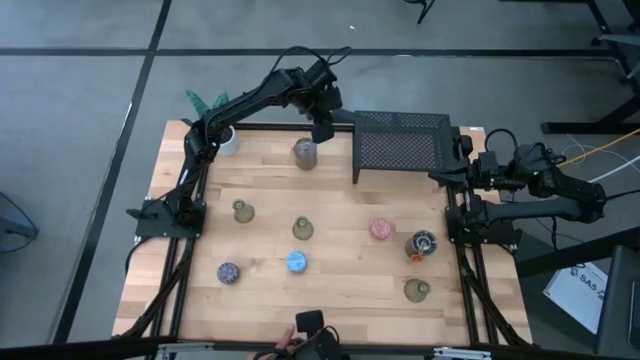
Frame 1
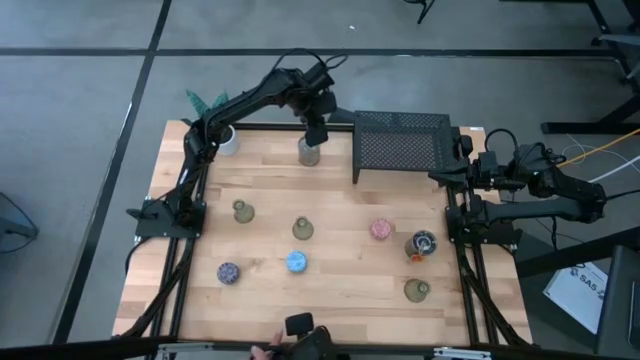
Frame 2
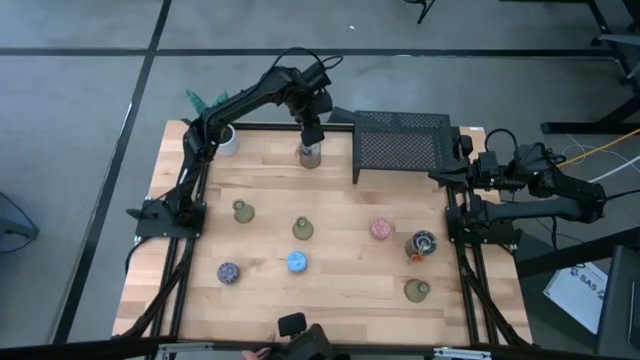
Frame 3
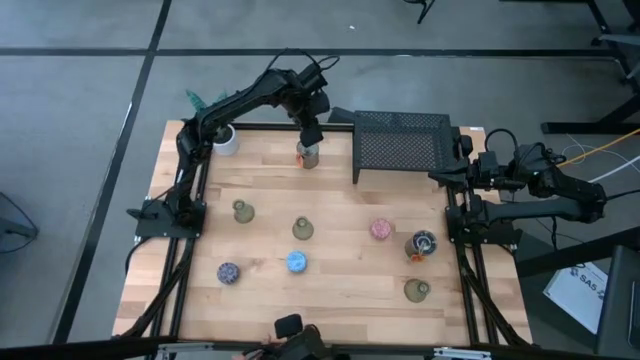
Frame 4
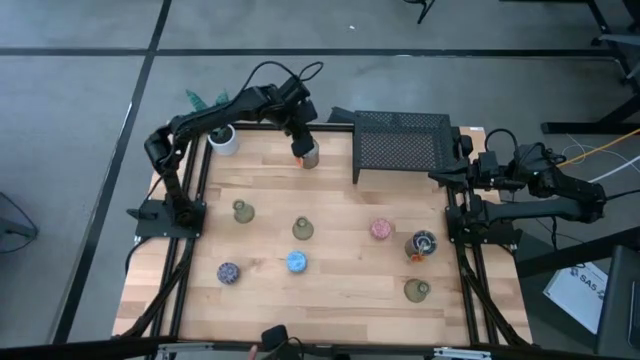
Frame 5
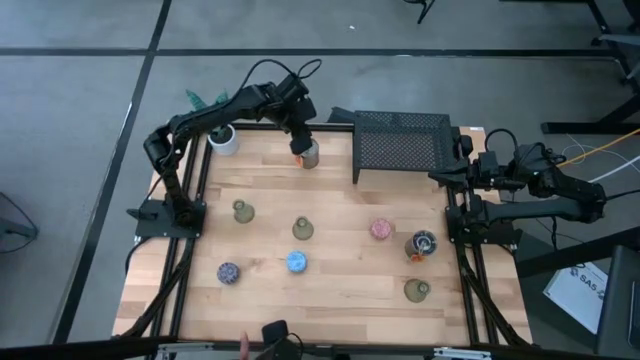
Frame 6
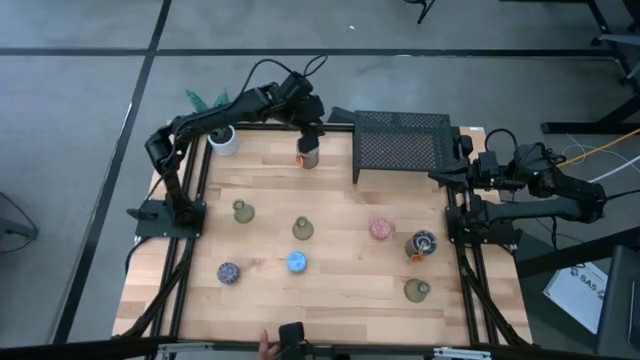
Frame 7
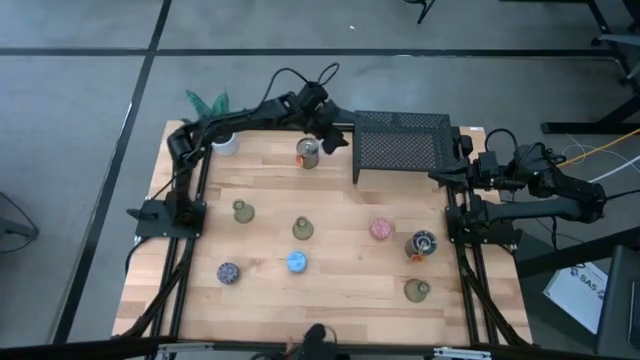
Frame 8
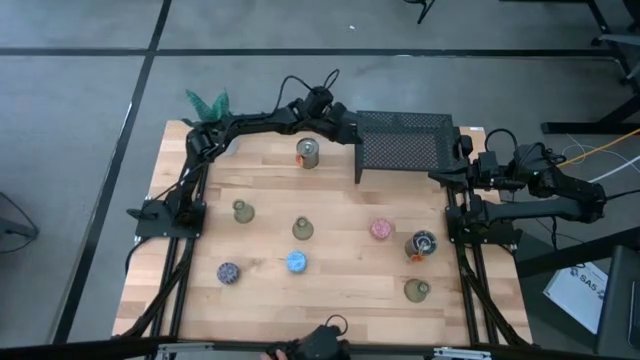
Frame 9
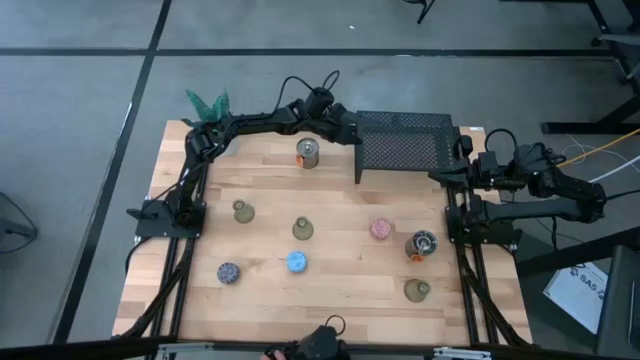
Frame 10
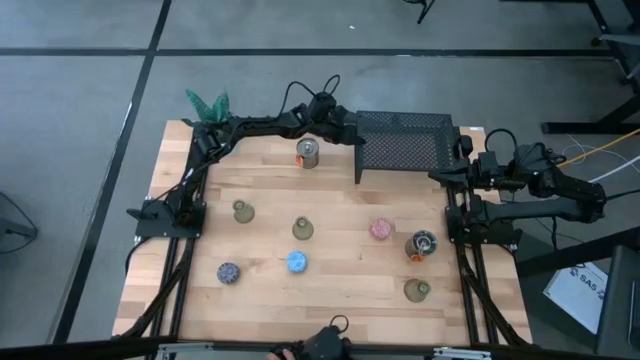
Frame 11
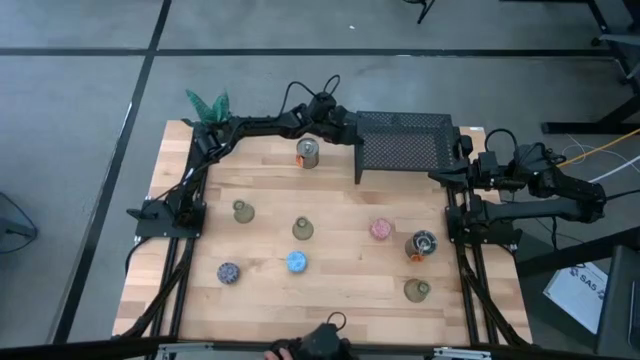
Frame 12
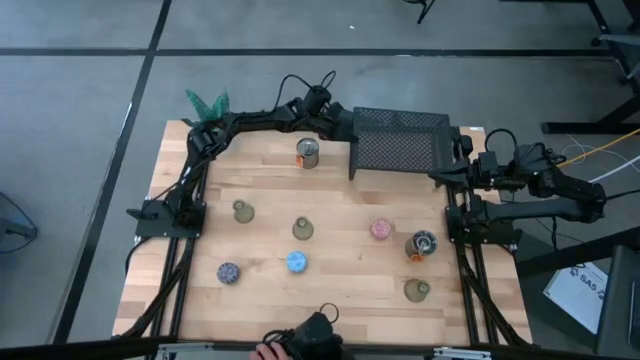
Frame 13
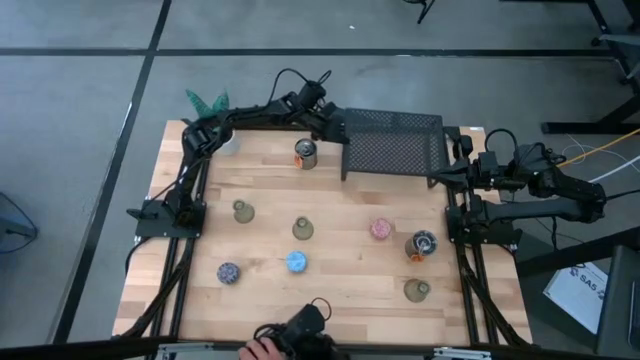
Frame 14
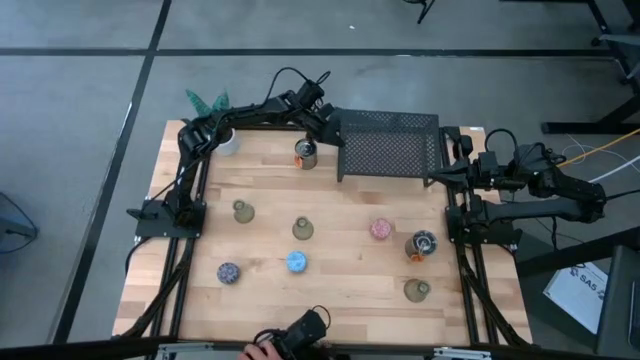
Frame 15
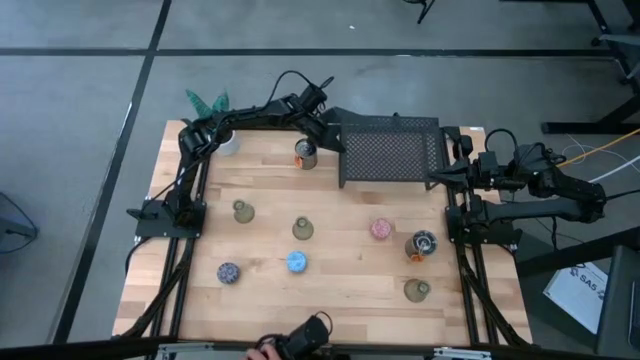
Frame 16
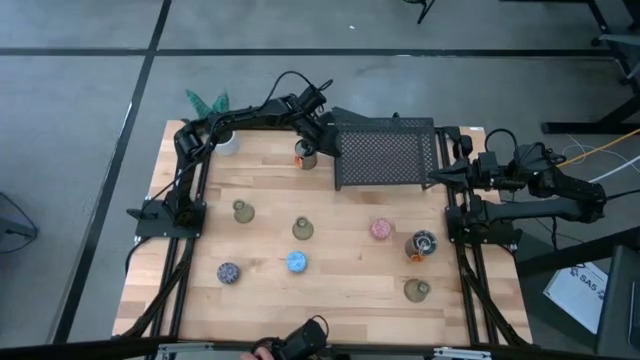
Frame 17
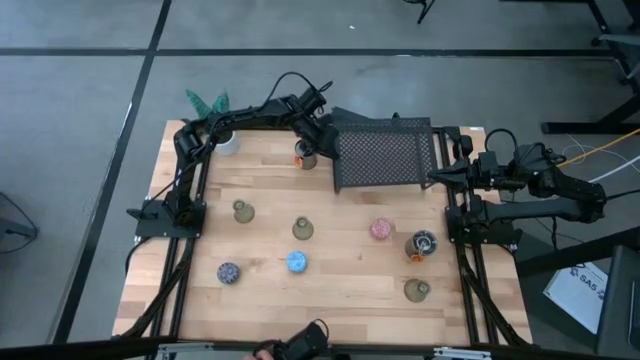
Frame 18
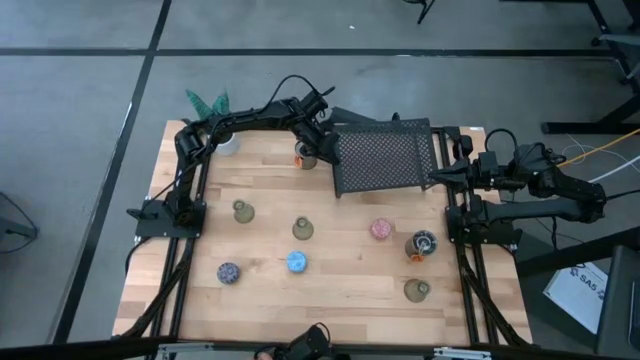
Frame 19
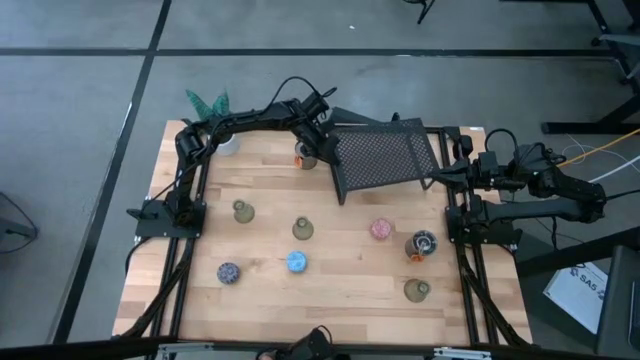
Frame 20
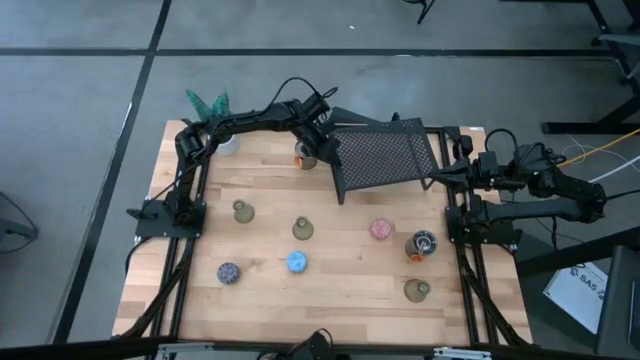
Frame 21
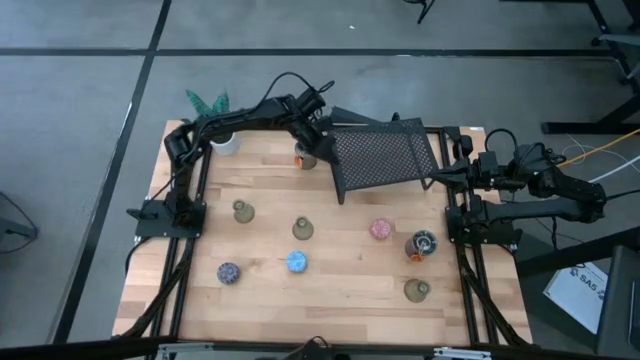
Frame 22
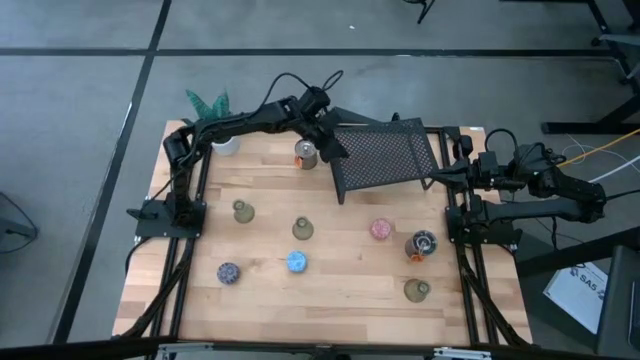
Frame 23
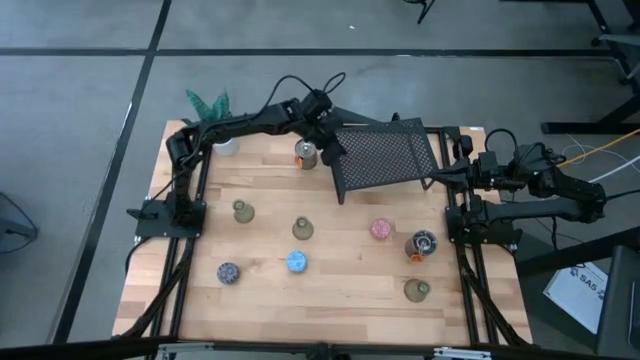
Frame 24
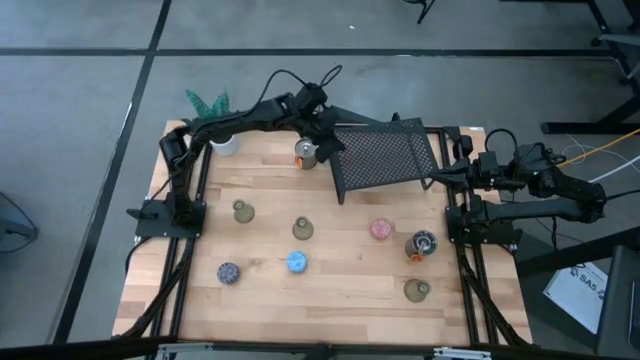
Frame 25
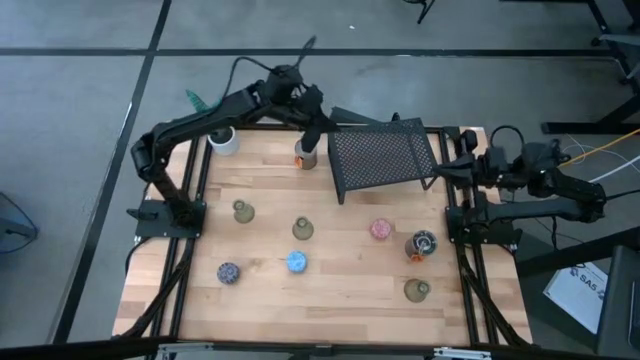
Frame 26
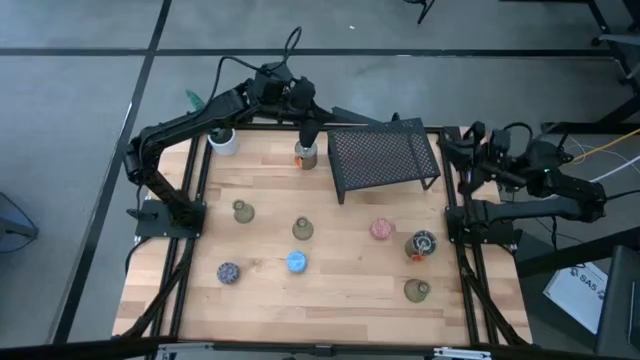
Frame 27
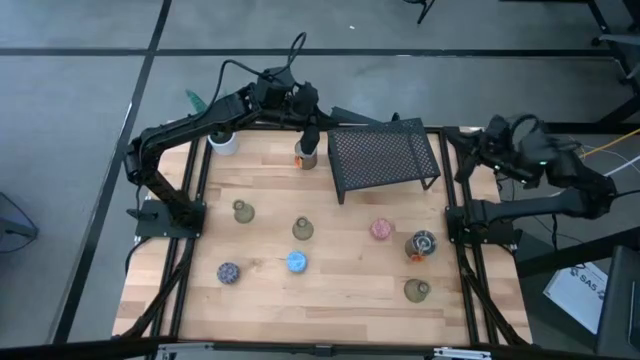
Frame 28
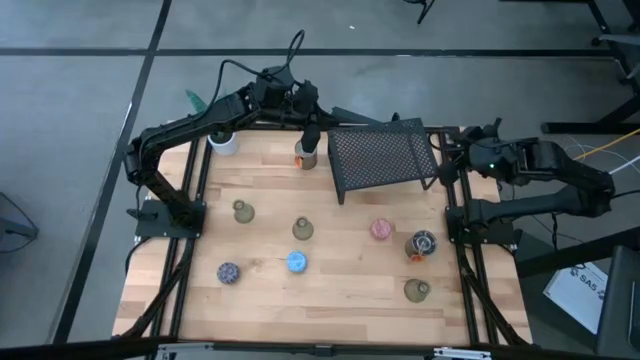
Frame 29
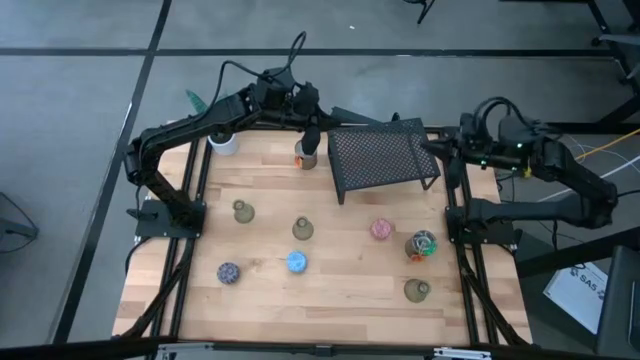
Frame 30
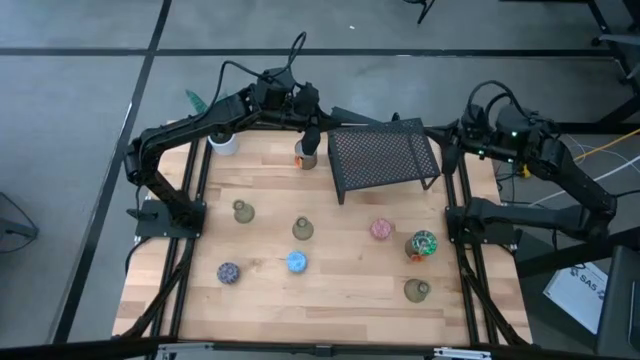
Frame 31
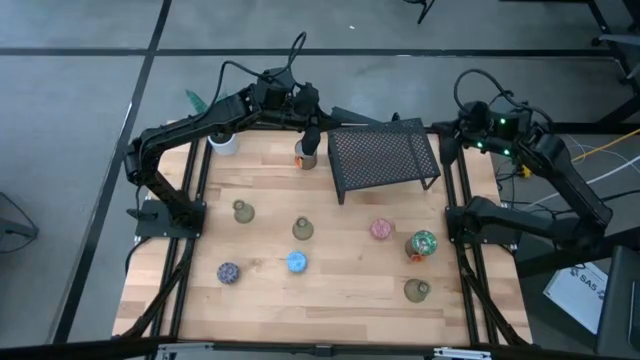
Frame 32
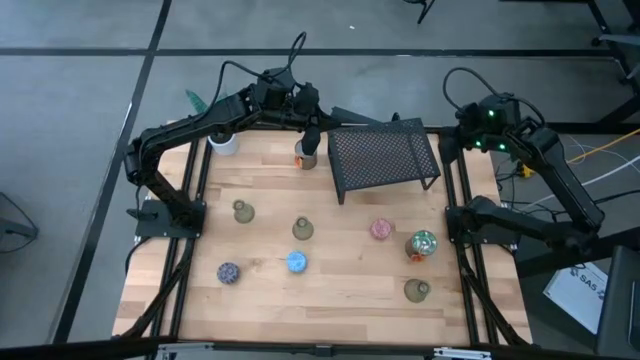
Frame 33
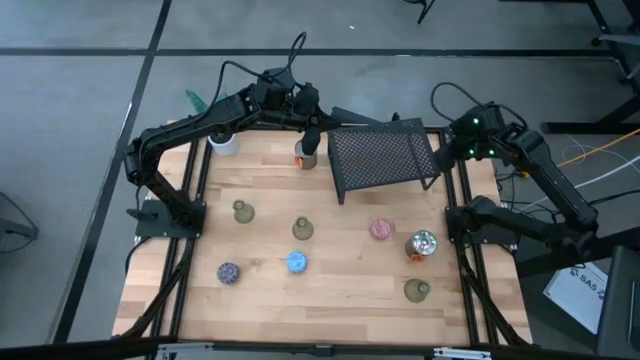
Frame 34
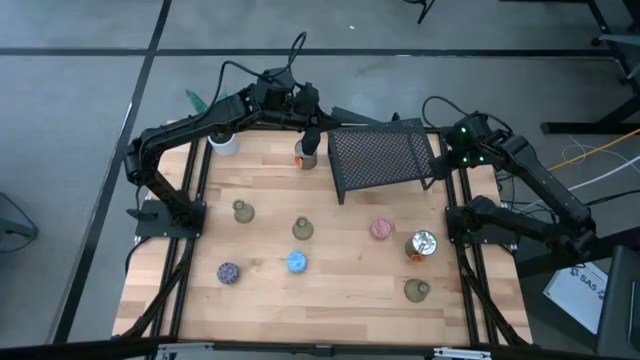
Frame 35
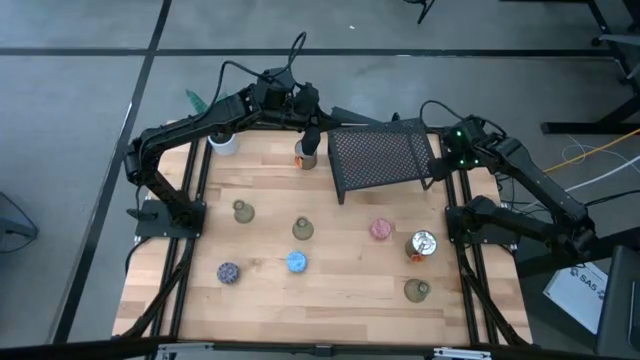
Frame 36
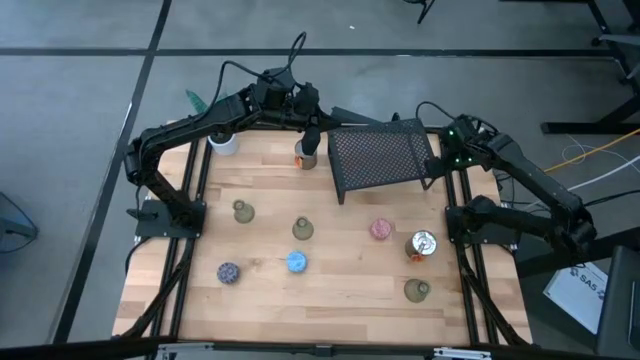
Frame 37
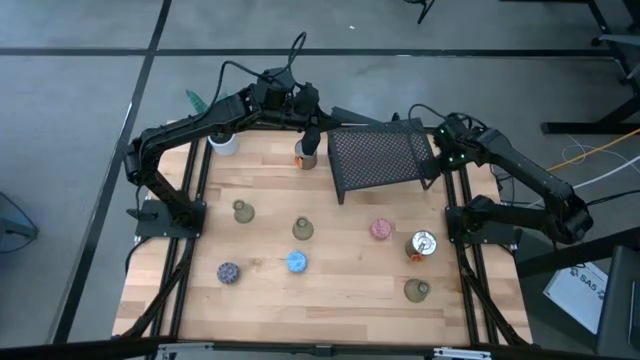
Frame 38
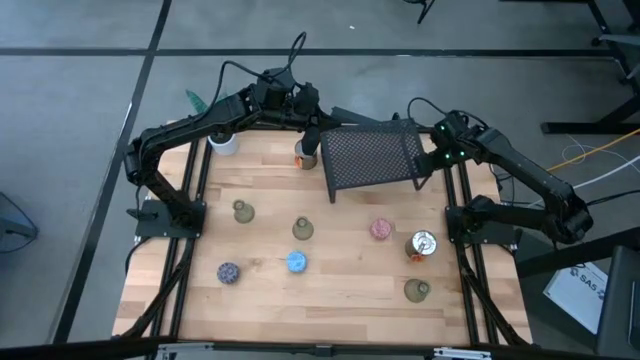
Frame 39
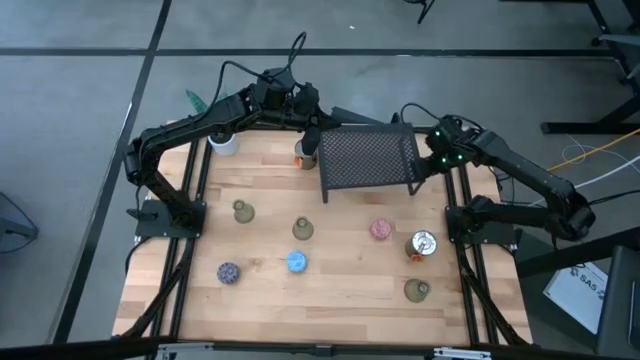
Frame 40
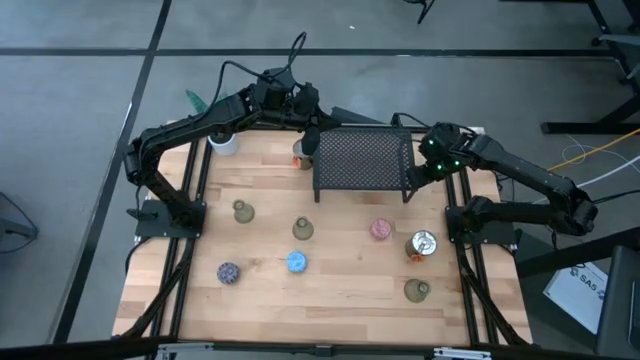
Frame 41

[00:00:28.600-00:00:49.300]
Task: Pick & Place candle stick holders
Adjust the shelf
